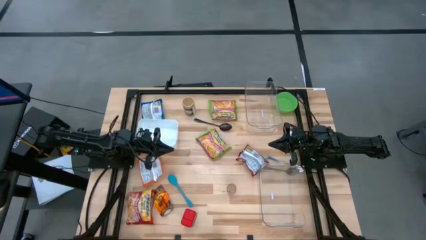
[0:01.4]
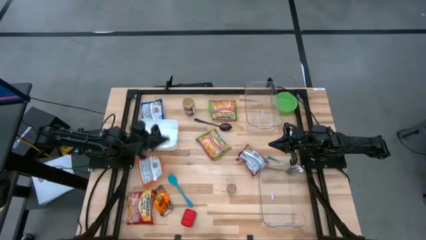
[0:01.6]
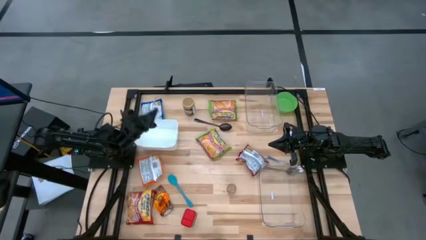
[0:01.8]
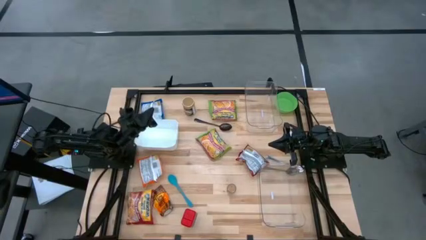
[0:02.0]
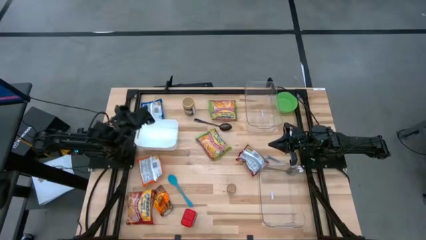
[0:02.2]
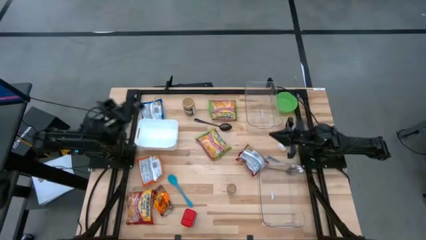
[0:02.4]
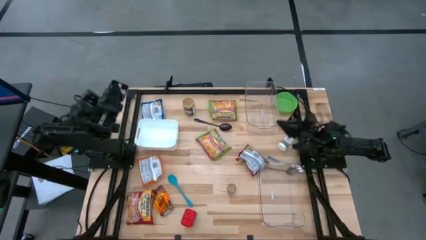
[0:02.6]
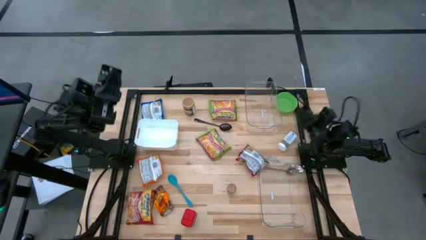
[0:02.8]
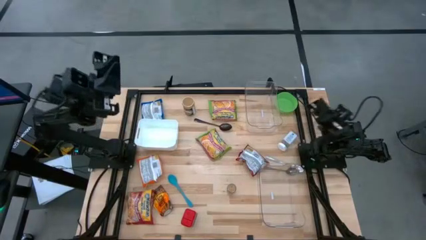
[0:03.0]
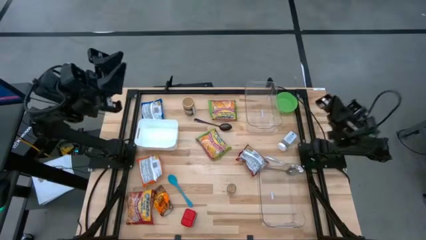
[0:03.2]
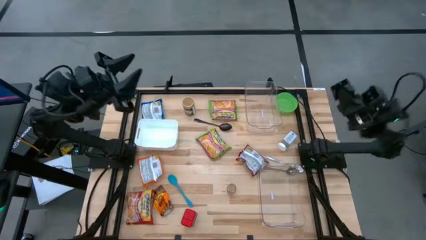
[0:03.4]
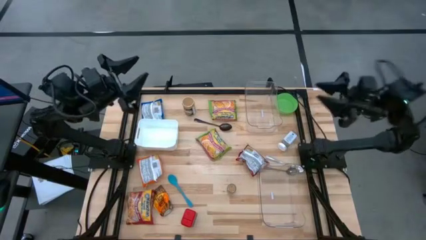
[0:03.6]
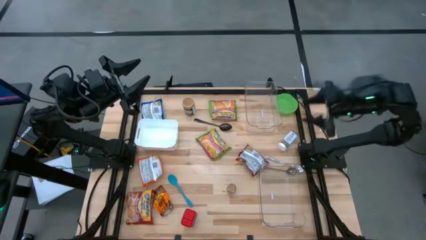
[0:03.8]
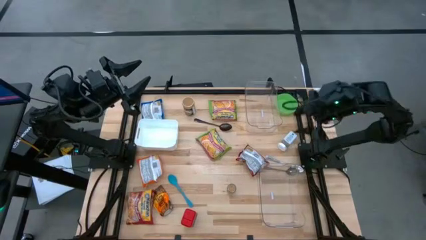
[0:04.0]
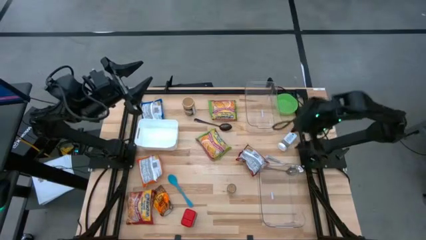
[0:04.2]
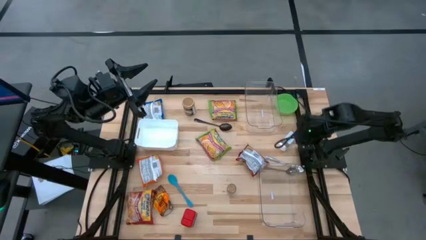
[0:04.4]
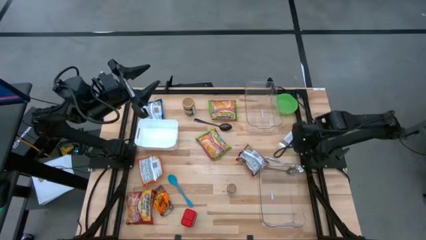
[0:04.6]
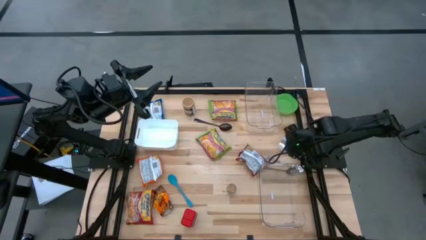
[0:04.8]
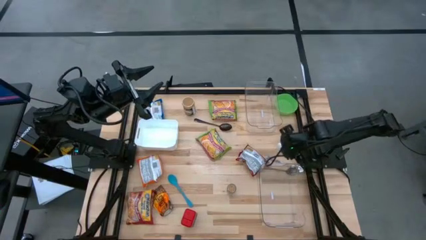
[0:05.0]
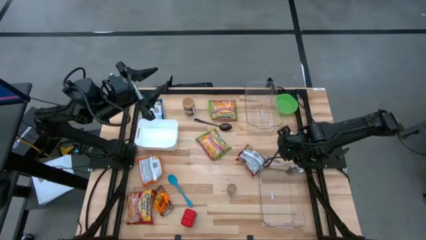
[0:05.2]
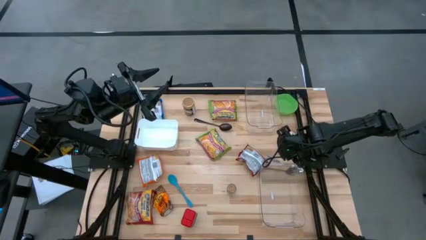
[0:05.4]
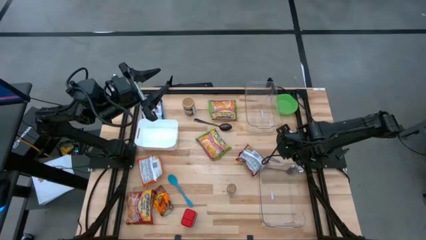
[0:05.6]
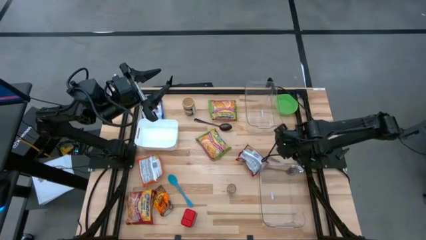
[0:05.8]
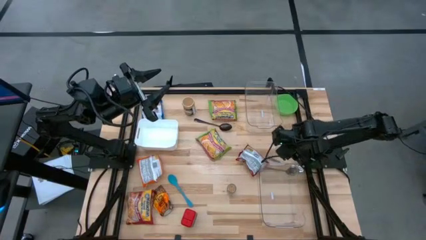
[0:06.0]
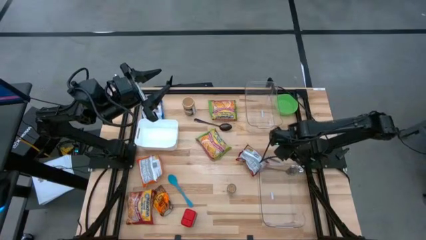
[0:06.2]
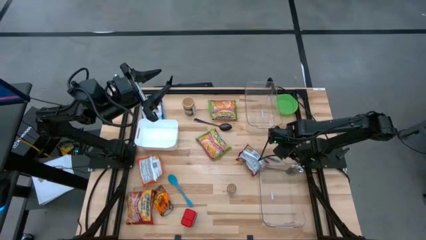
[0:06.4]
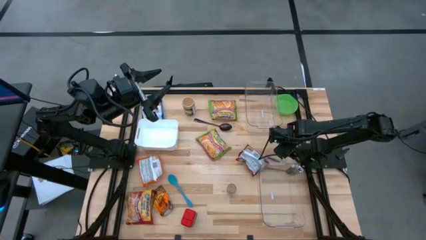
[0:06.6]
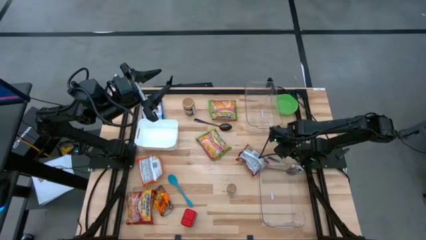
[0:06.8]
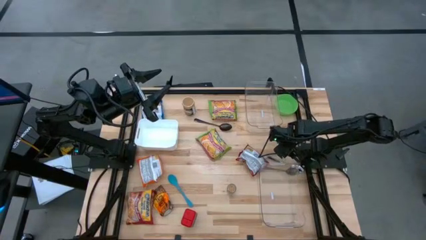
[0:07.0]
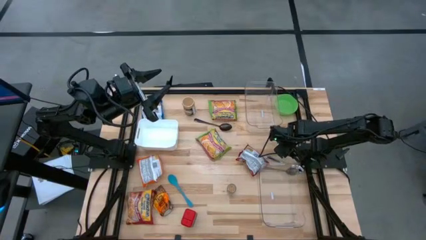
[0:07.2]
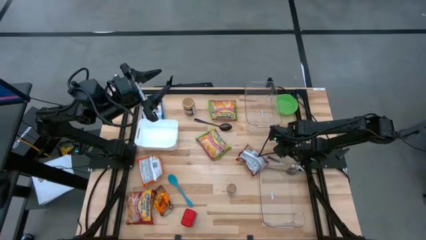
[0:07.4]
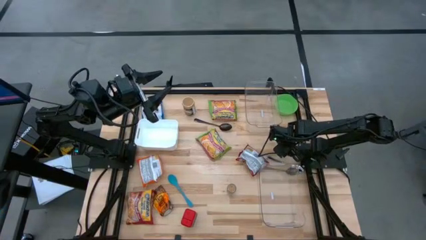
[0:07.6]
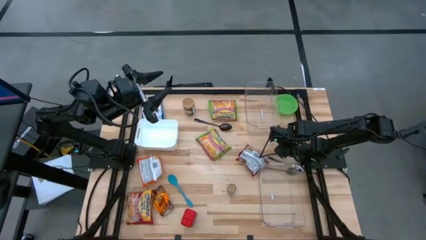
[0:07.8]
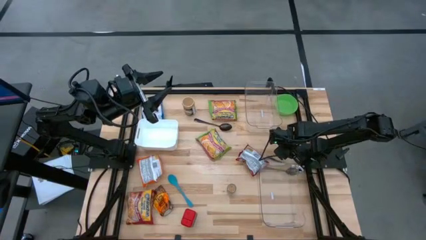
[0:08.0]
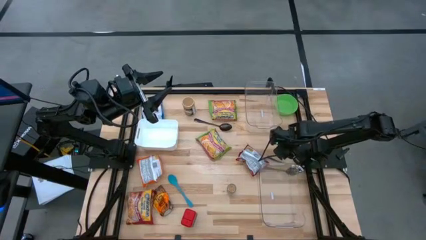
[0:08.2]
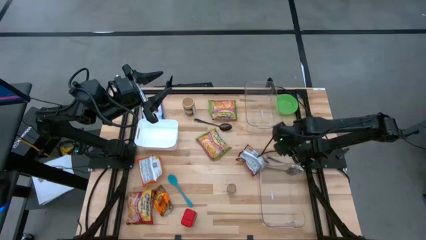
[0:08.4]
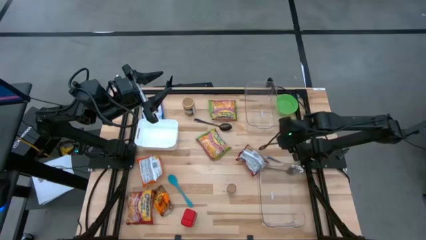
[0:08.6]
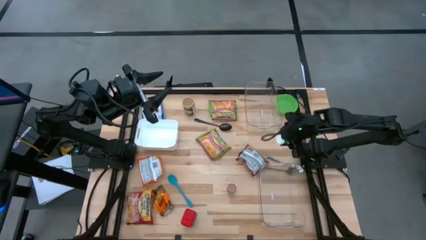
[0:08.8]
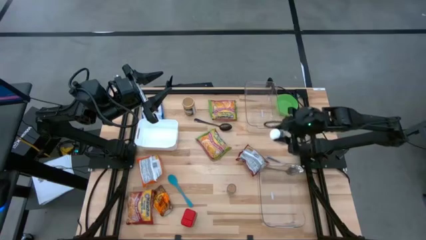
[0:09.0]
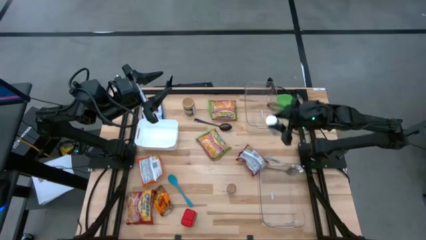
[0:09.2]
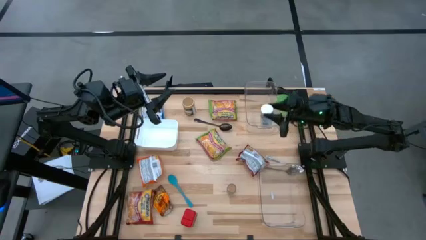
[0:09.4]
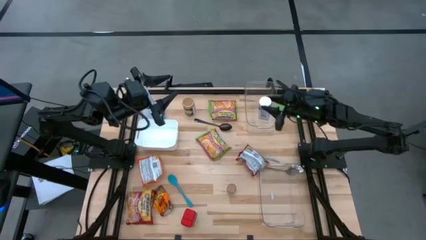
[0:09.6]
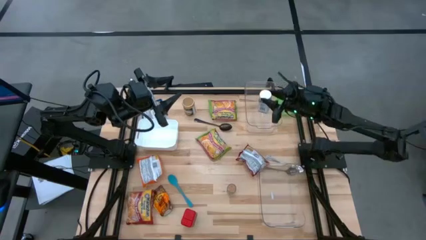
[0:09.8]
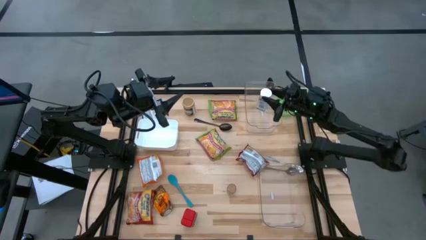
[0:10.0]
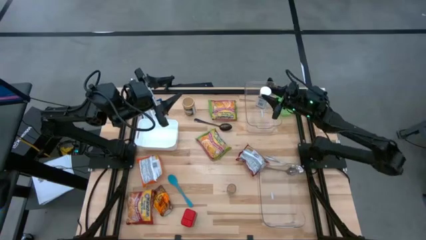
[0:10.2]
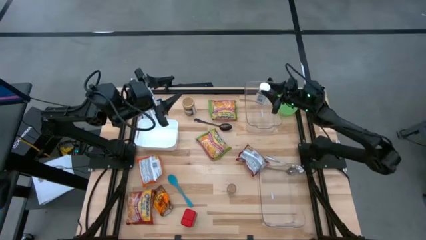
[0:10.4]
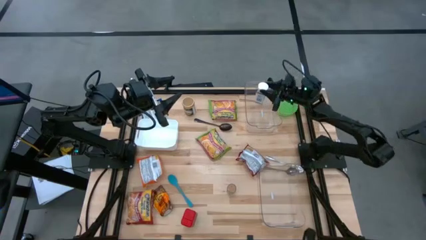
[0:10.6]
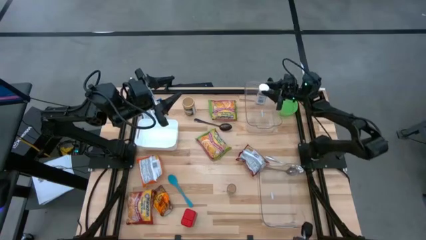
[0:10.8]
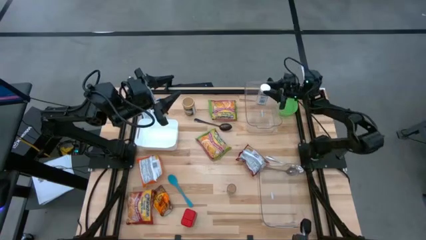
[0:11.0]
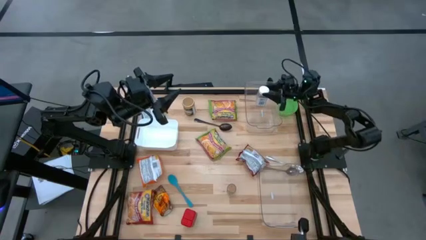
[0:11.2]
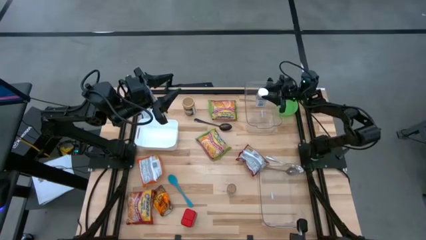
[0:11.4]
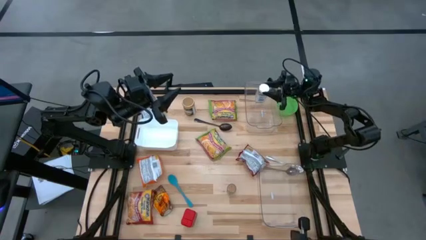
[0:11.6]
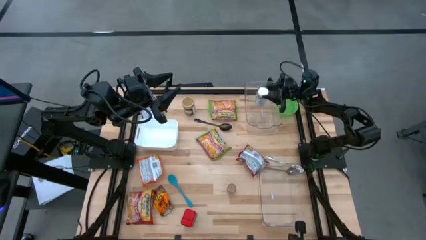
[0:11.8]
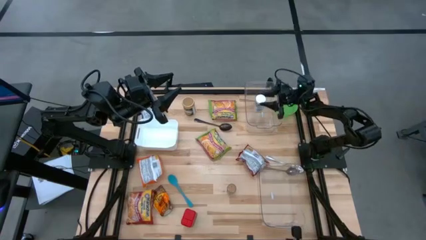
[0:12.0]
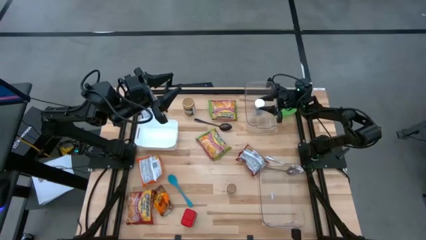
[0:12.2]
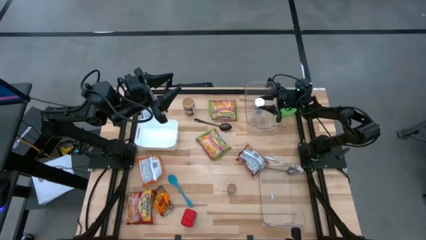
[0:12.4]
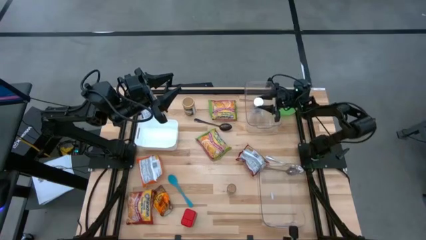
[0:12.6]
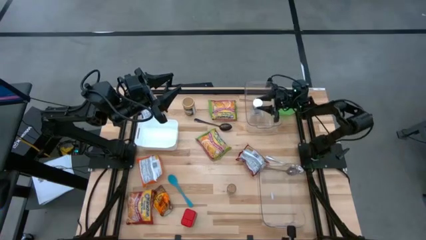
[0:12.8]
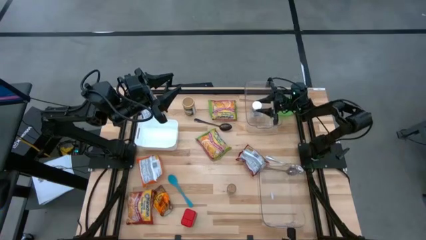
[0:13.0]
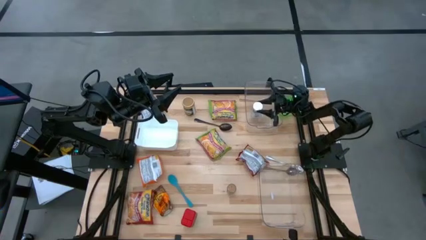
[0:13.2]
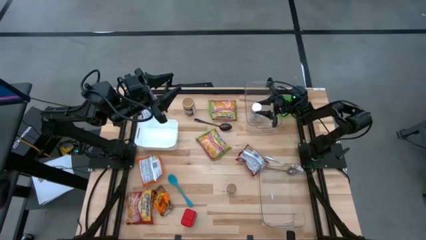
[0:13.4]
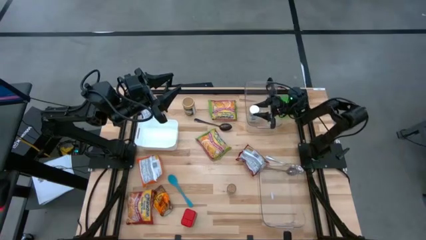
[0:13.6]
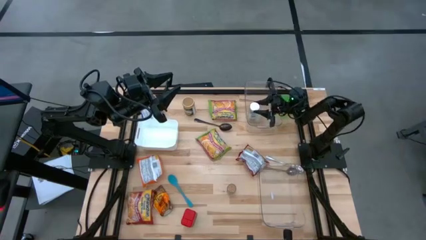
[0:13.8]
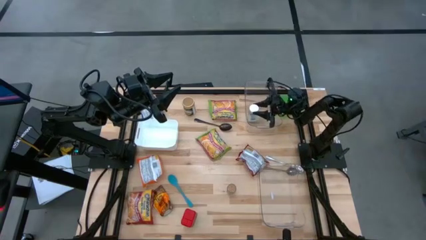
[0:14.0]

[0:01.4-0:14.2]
Task: Pick & Place Food Item
Put the white seasoning bottle into the top transparent bin
